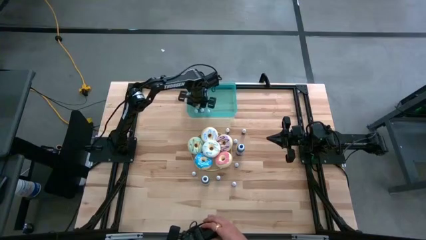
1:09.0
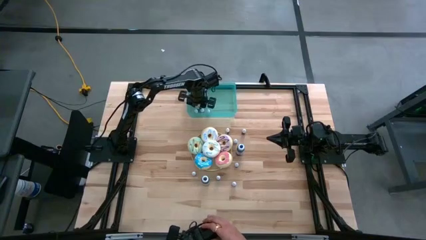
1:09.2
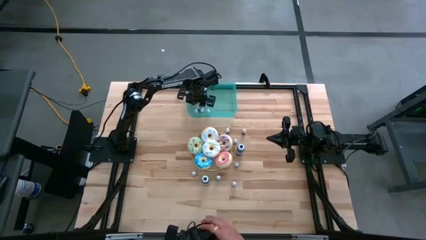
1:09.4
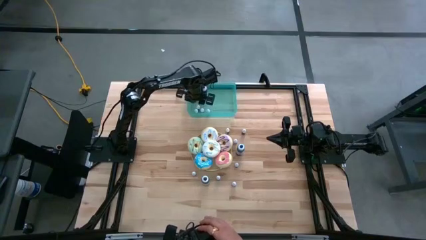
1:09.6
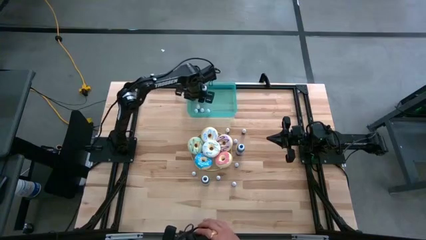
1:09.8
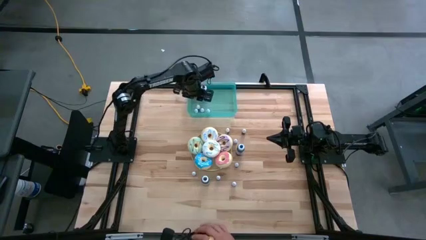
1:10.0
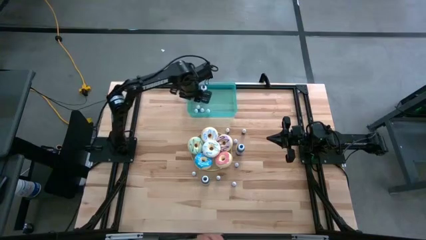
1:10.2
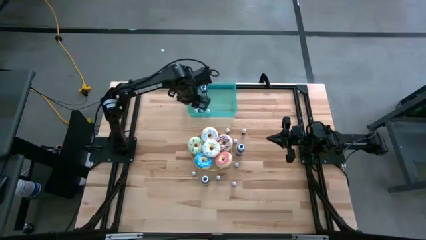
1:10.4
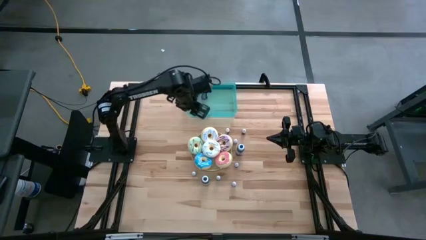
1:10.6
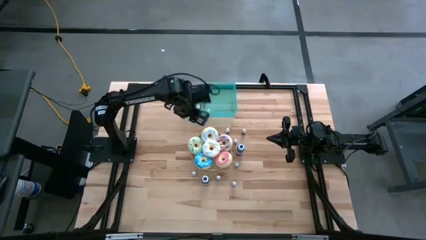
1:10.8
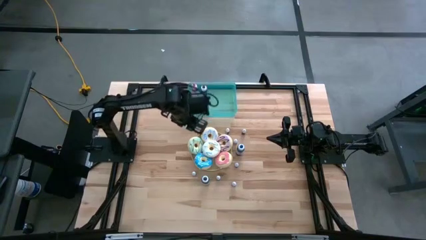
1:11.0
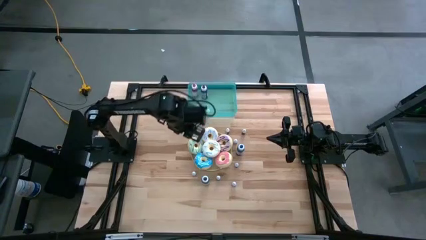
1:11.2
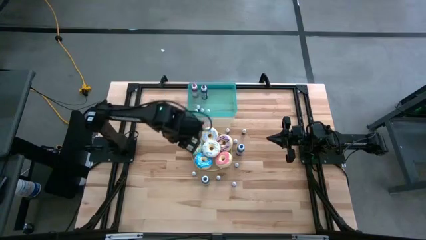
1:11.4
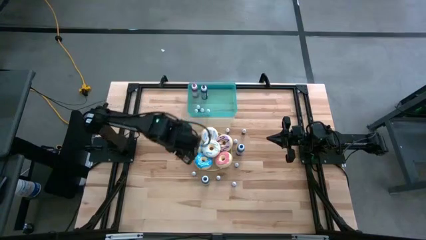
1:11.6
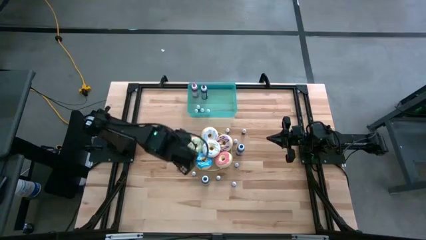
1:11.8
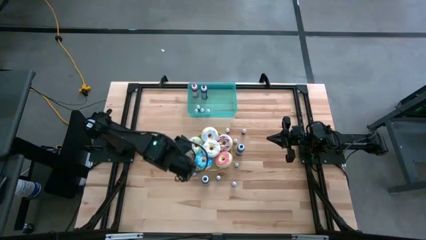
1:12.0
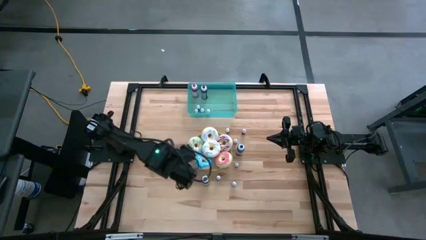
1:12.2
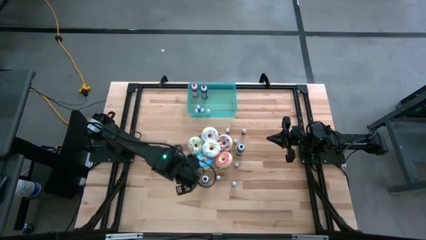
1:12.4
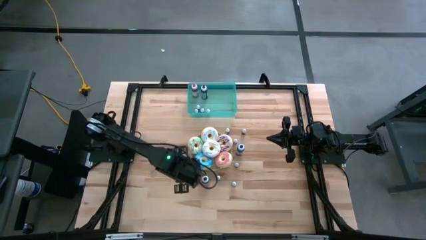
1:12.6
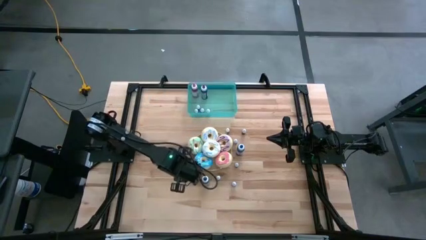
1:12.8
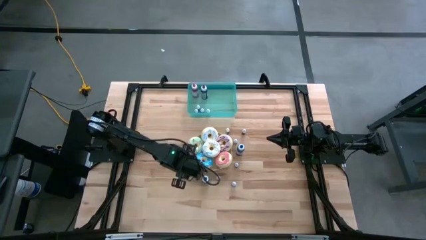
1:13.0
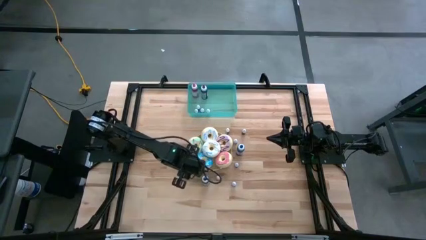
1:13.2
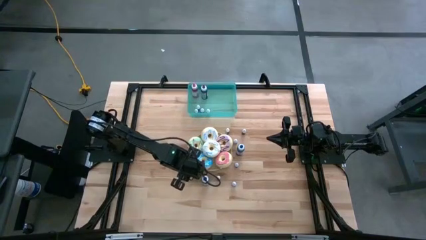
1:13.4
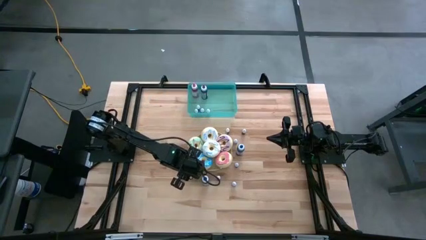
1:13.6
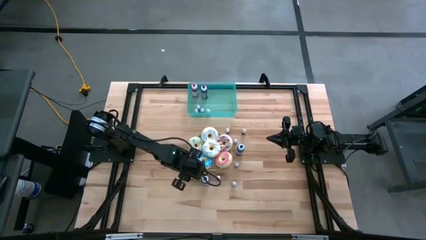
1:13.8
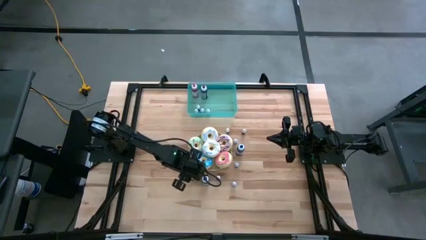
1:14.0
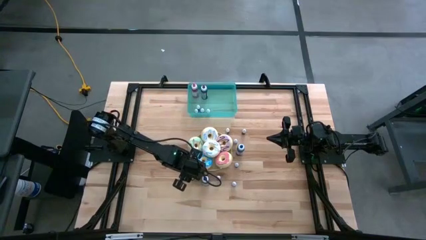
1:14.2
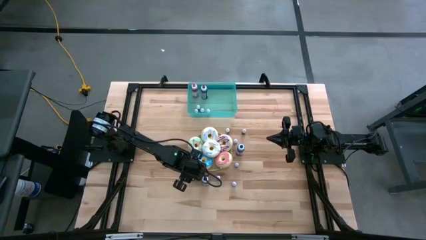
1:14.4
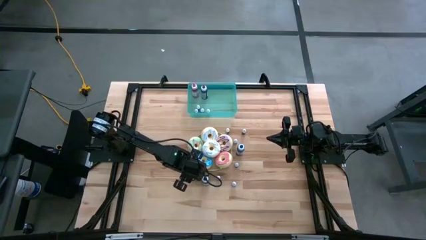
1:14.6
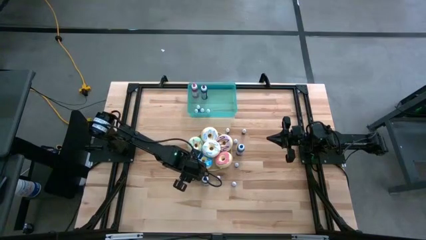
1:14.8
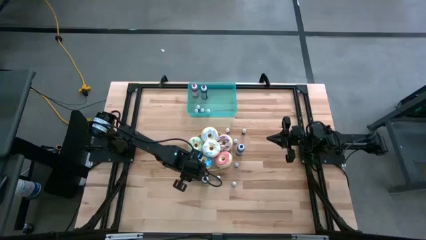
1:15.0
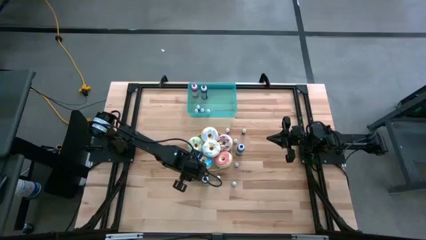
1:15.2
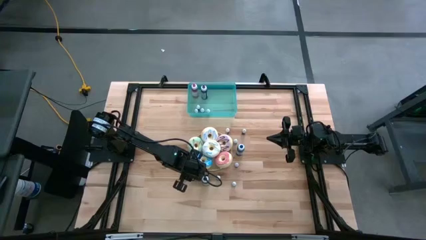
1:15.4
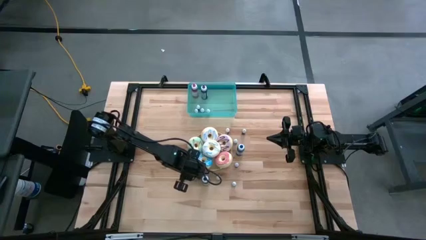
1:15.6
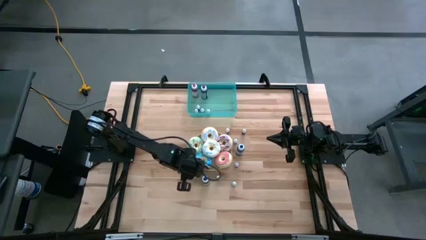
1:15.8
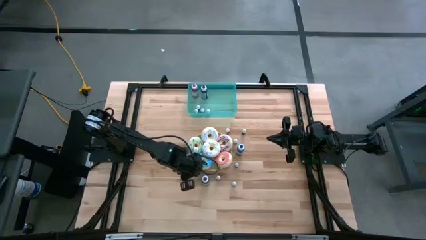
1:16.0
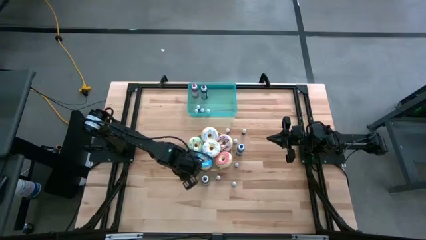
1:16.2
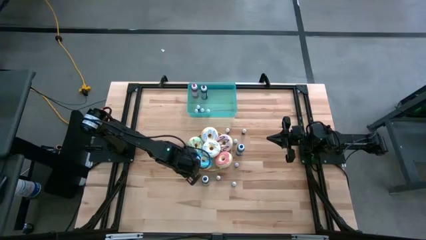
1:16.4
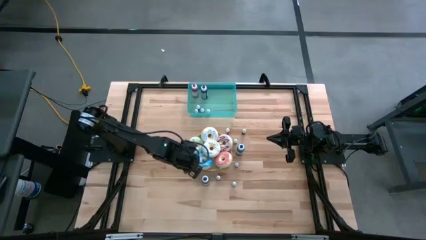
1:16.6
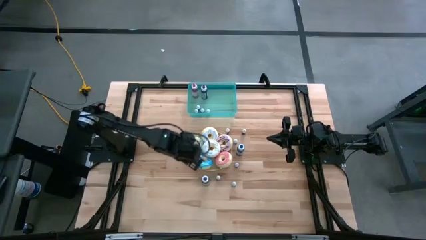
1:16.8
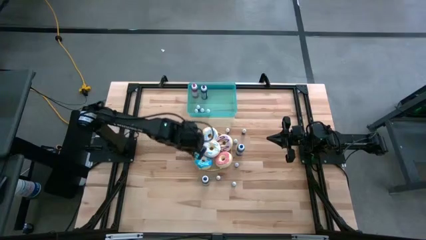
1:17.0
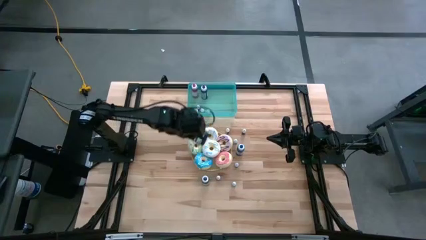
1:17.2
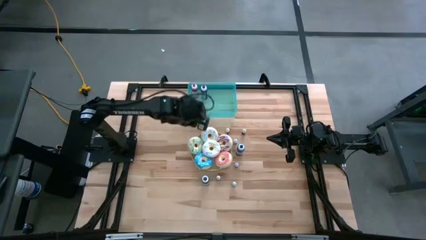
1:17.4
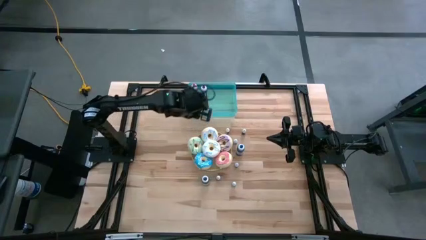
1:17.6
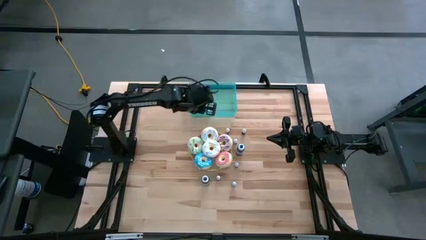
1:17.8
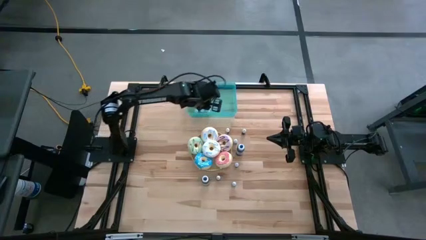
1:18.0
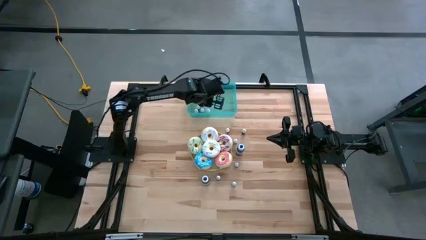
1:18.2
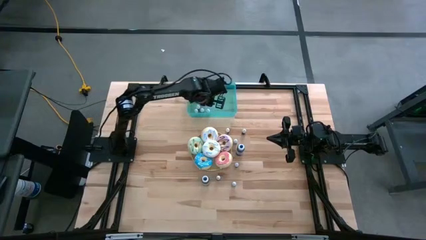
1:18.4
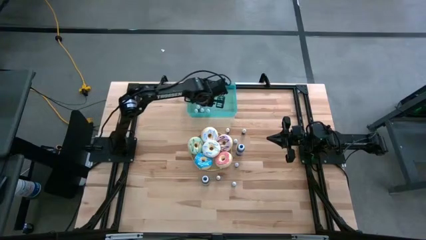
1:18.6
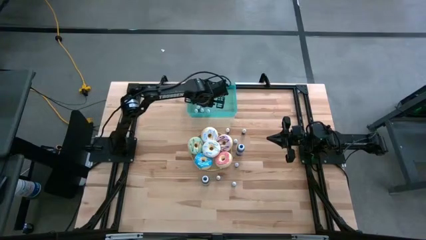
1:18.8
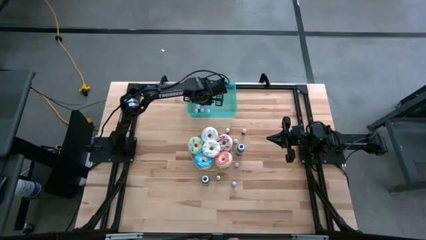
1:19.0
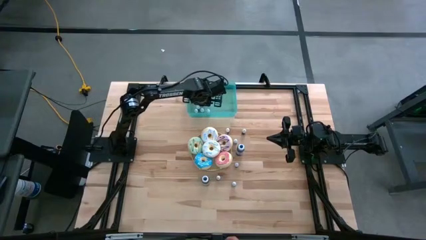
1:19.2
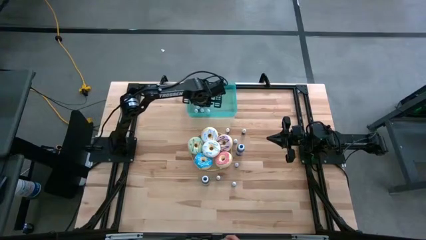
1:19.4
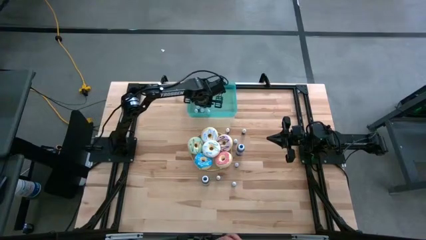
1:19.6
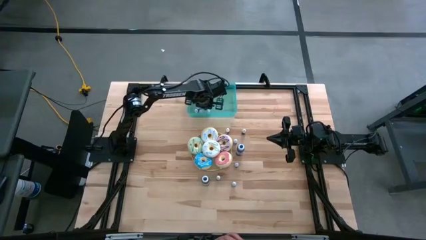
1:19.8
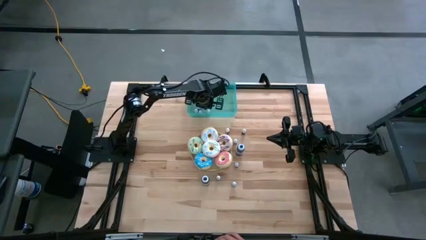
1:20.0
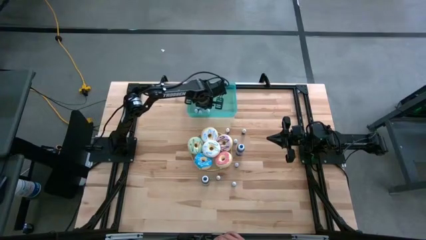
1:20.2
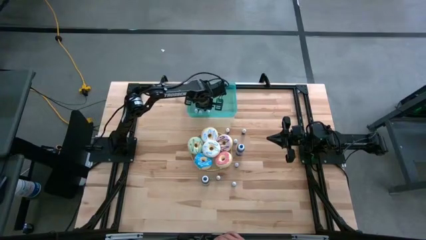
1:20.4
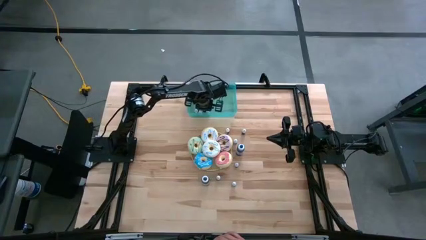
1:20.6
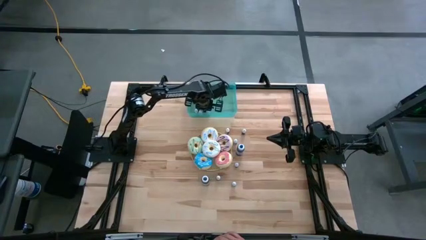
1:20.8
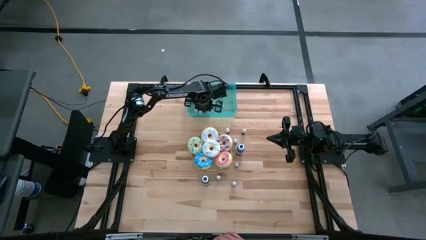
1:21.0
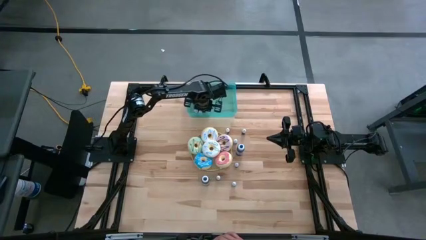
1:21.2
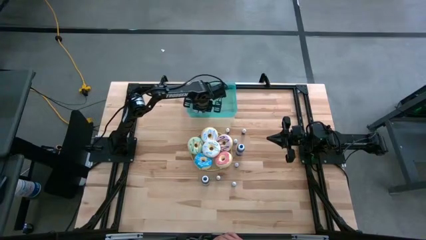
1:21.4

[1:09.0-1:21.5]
Task: Pick & Place food coloring
Put the small black food coloring bottle into the green container

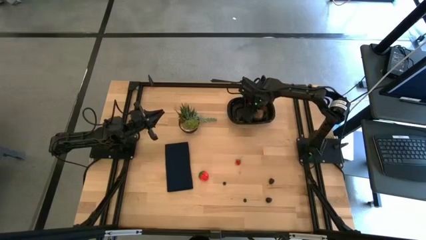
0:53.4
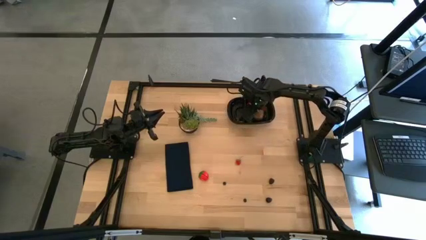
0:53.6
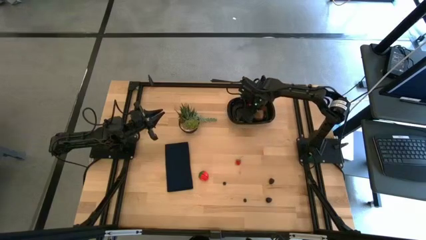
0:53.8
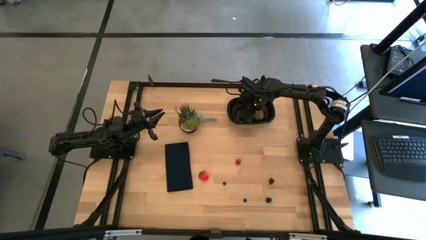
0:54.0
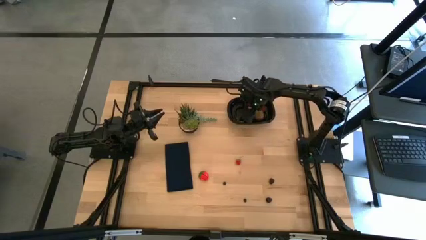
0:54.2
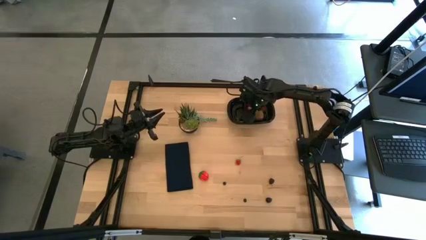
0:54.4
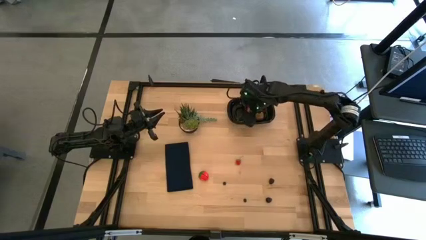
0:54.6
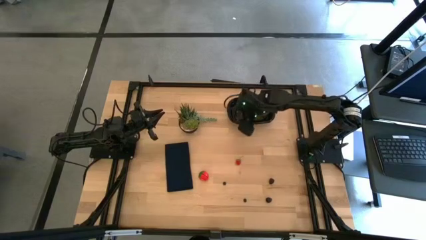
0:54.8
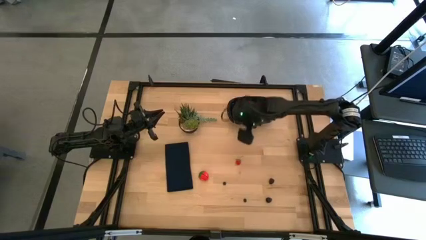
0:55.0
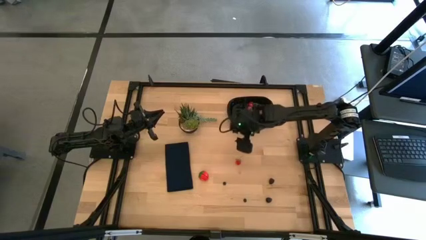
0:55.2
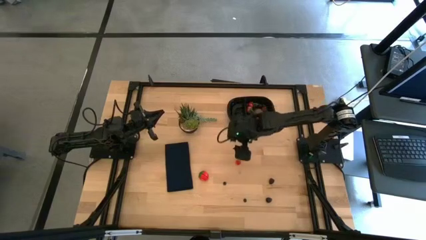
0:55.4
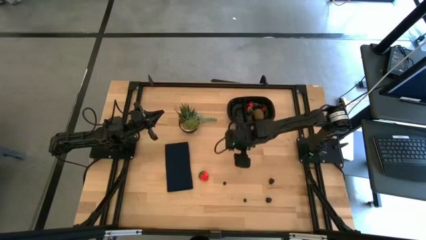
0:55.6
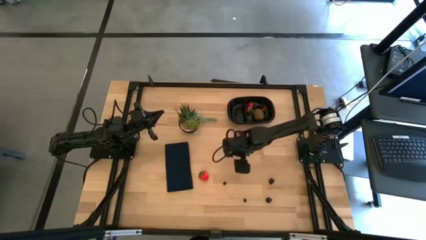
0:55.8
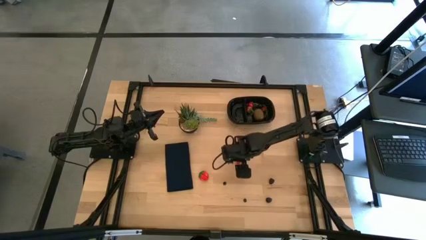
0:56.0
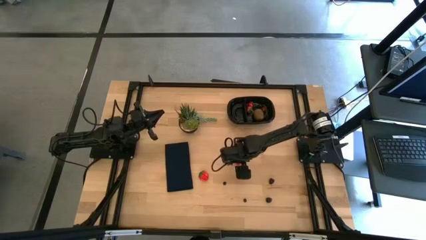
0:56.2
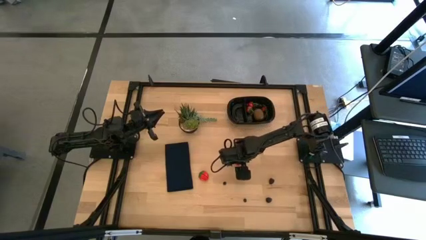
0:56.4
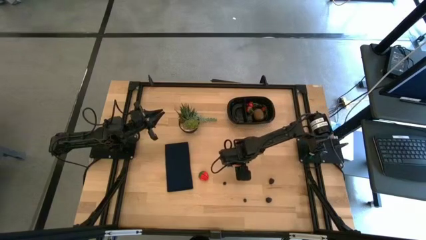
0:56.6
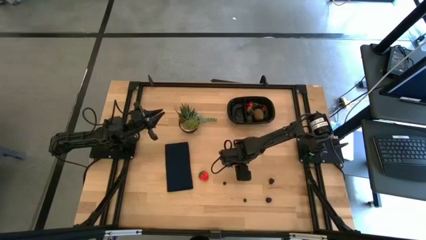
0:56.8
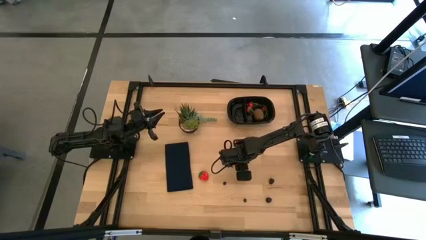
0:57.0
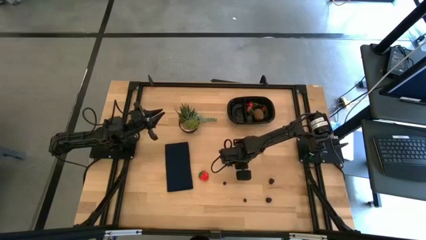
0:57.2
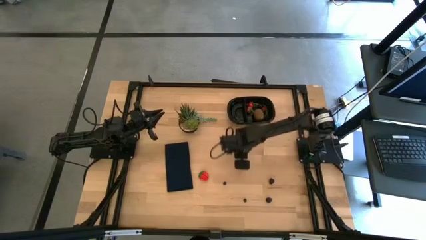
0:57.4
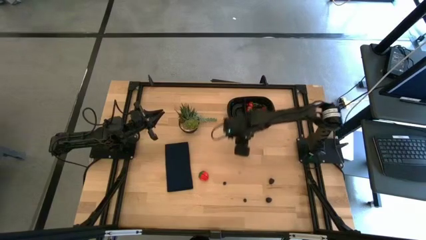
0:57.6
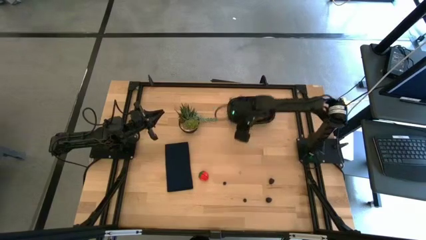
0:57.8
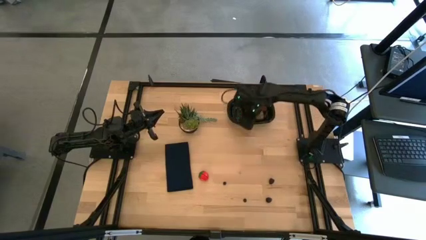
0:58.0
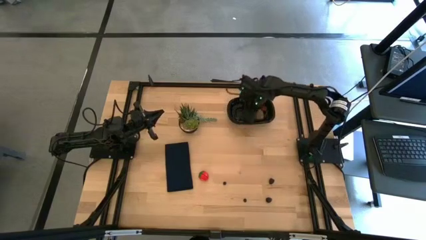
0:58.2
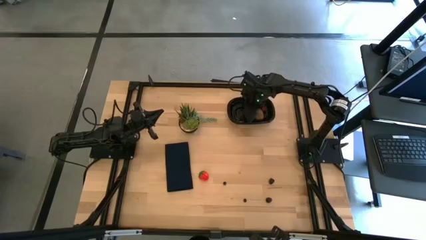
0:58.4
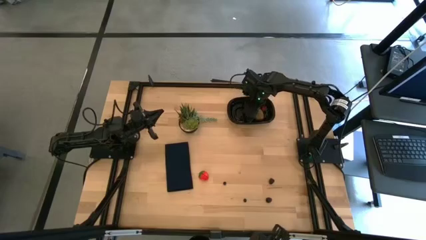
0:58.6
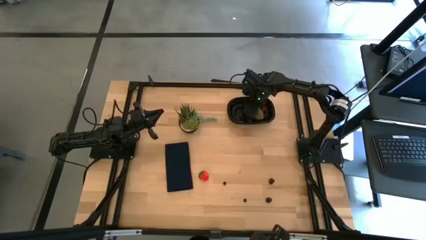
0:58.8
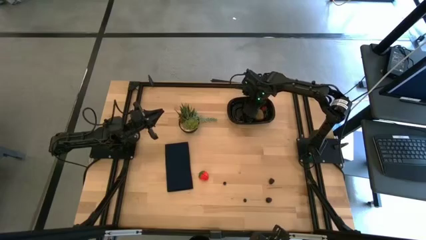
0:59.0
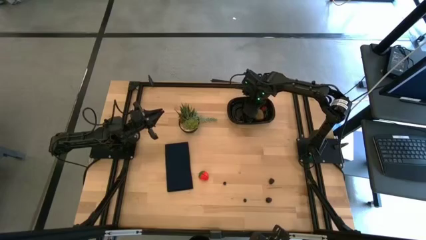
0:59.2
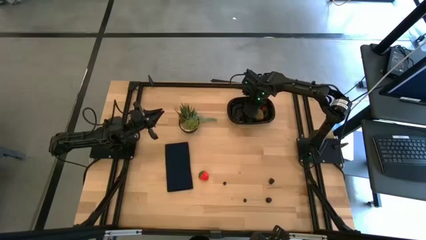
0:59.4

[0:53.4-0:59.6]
Task: Pick and placing Produce into tupperware
Put the strawberry into the black container
